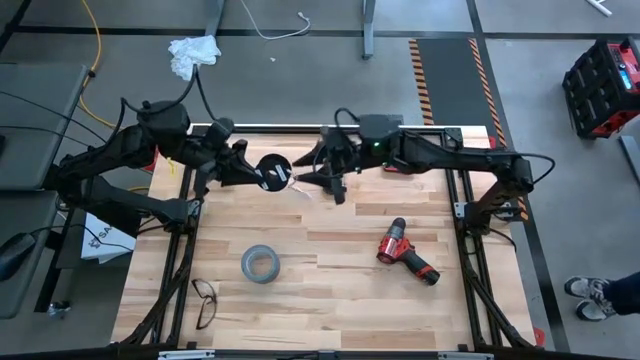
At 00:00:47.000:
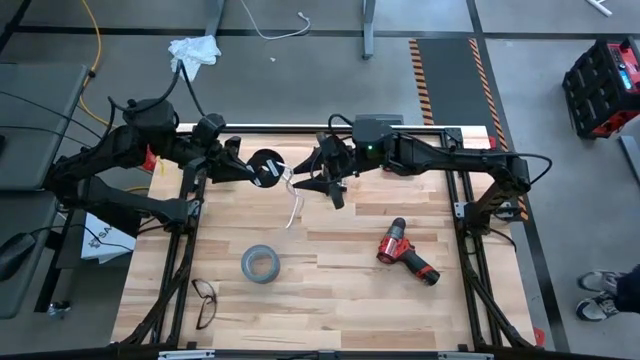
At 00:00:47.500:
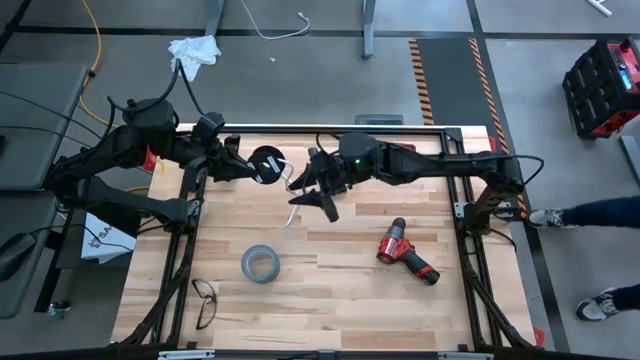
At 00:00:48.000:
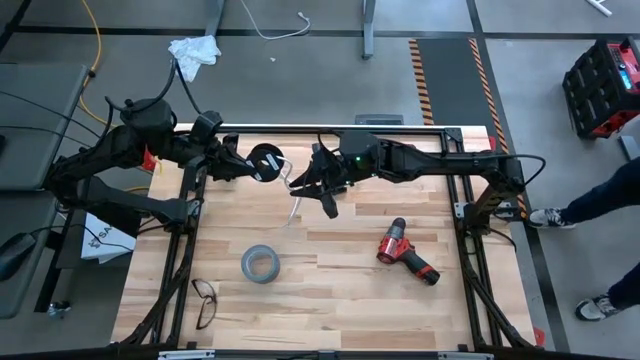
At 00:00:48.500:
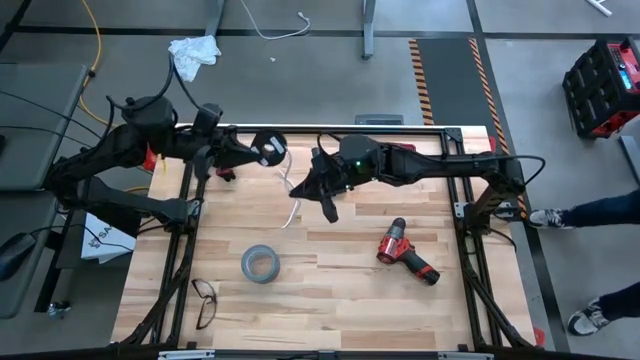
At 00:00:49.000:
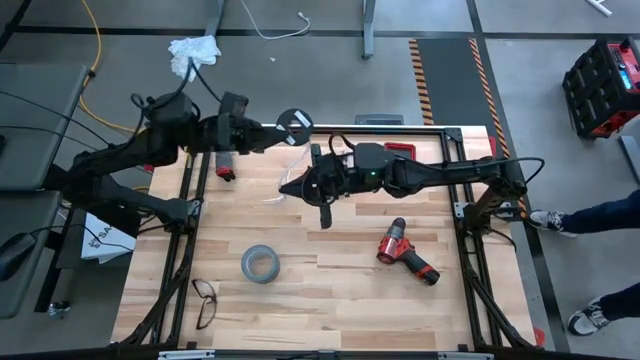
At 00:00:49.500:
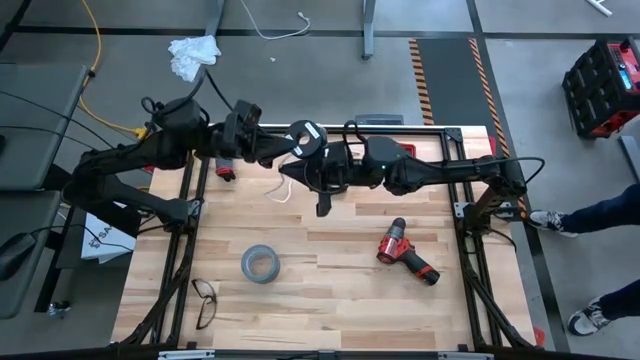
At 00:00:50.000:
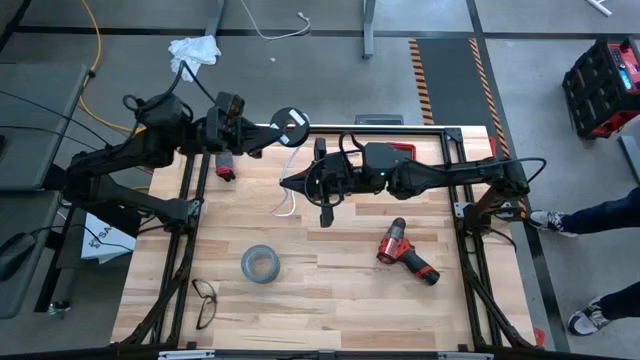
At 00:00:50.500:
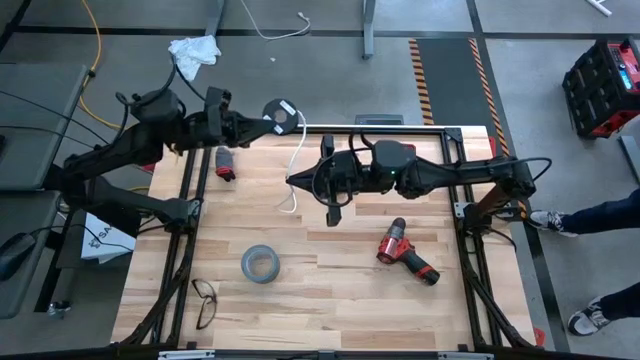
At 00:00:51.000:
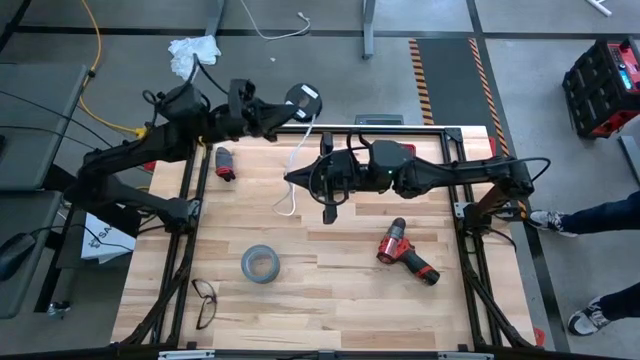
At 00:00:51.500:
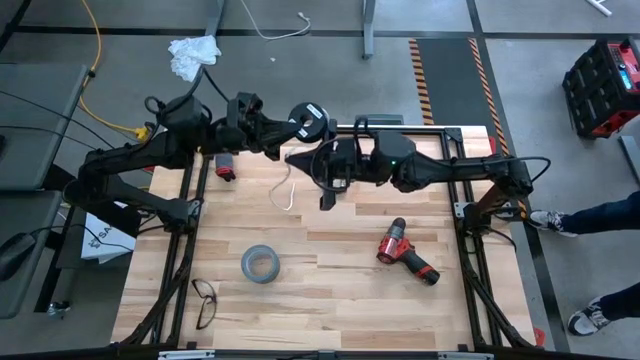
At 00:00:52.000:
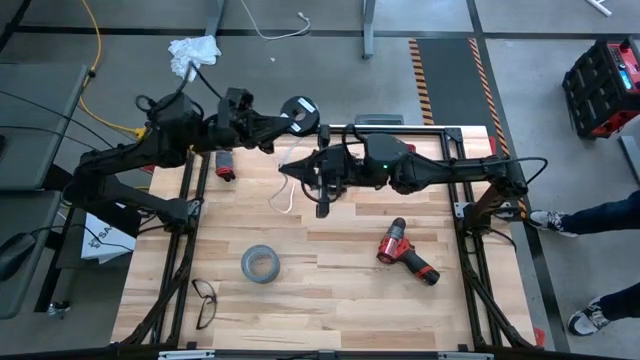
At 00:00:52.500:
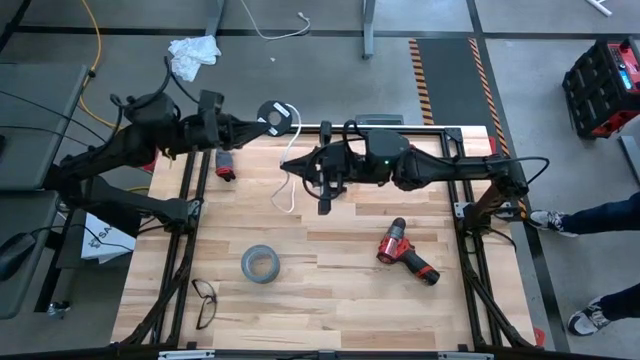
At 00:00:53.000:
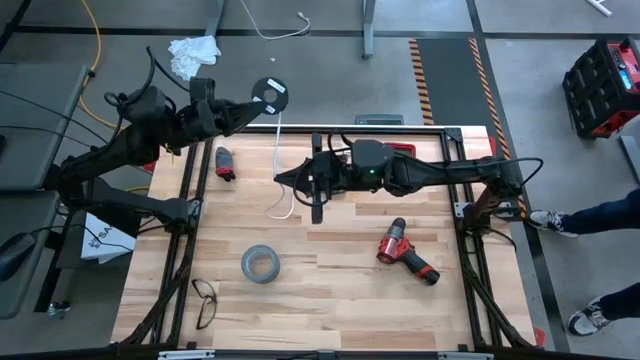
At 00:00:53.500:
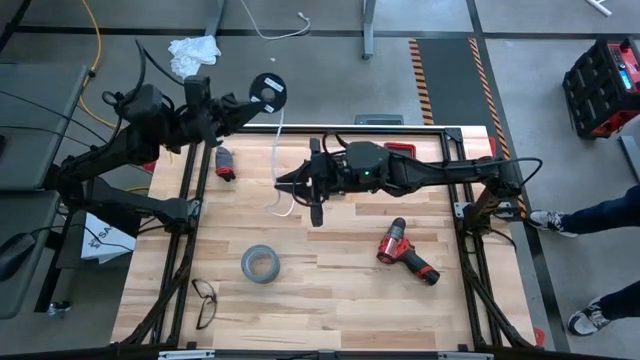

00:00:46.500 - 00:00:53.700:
Task: Coil cords
Coil the white wire

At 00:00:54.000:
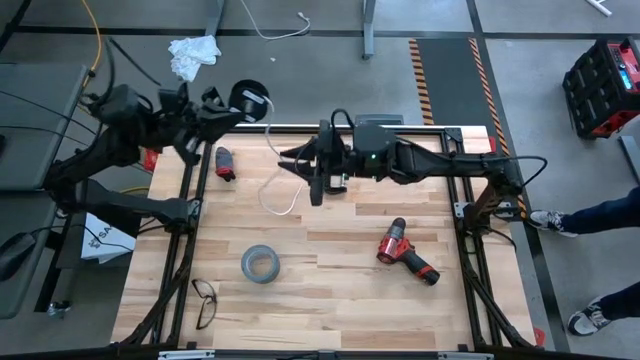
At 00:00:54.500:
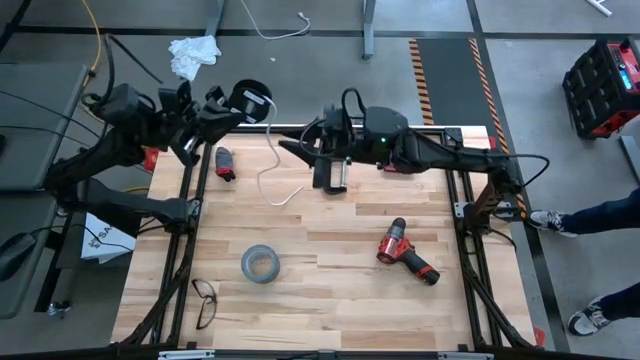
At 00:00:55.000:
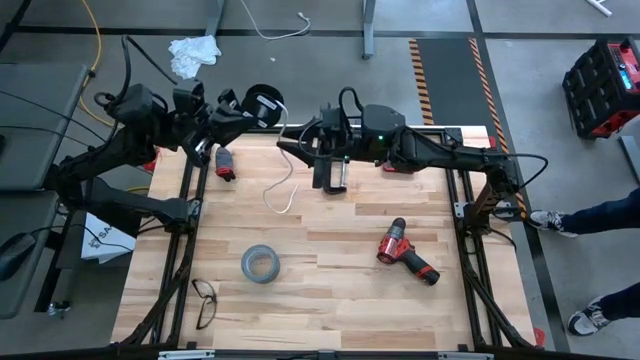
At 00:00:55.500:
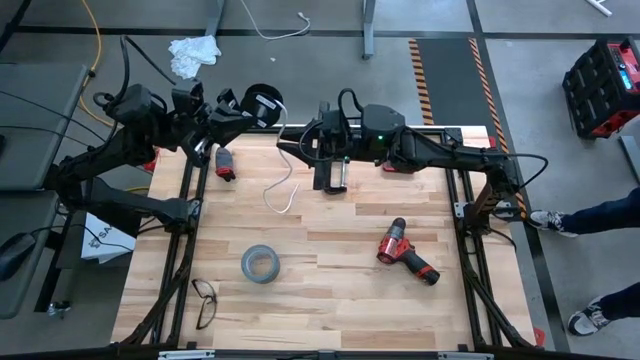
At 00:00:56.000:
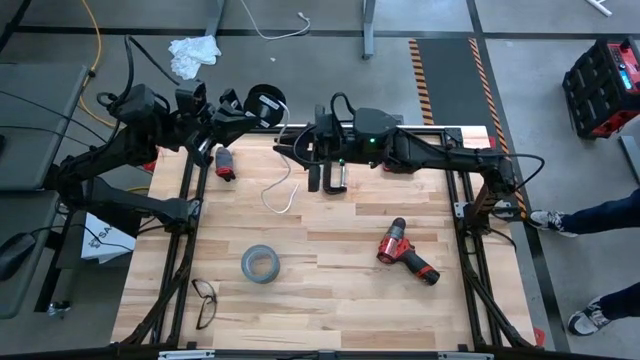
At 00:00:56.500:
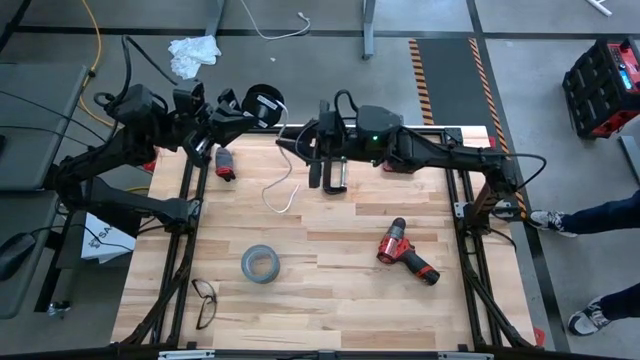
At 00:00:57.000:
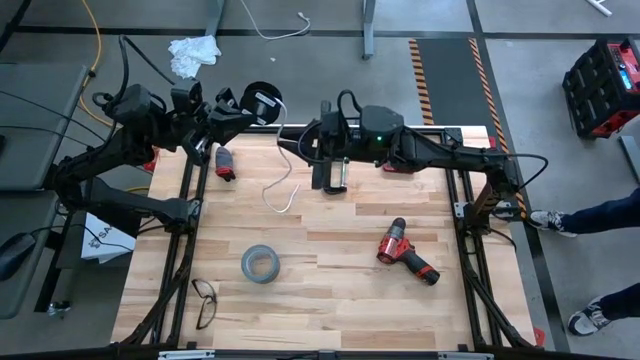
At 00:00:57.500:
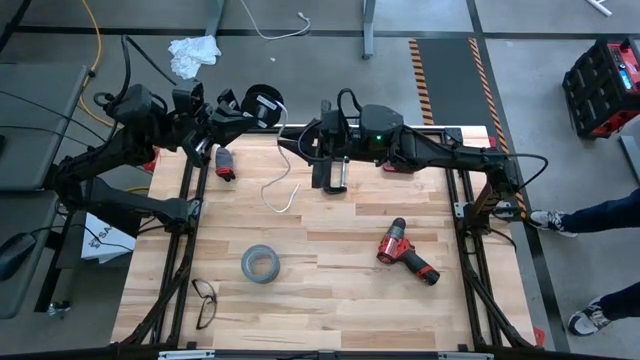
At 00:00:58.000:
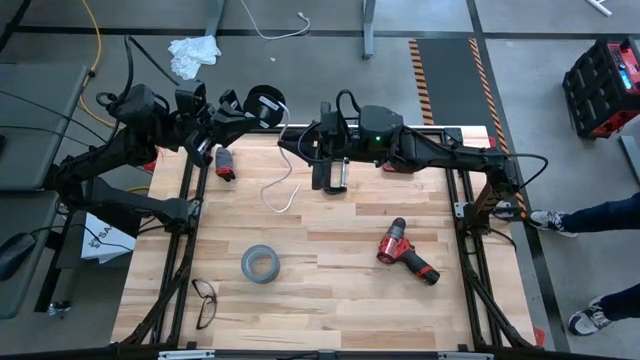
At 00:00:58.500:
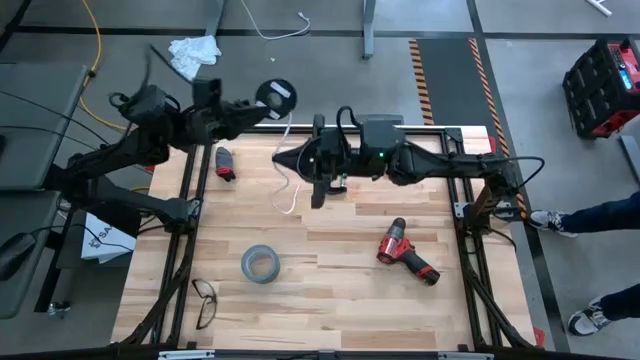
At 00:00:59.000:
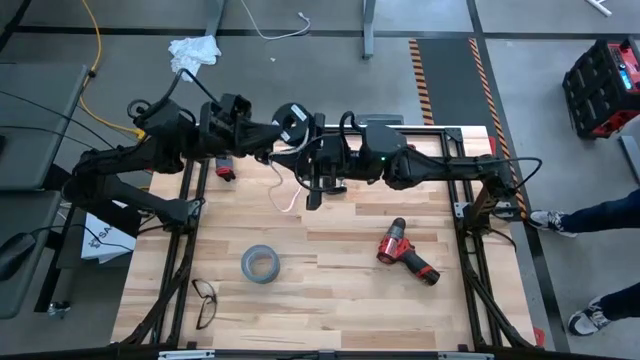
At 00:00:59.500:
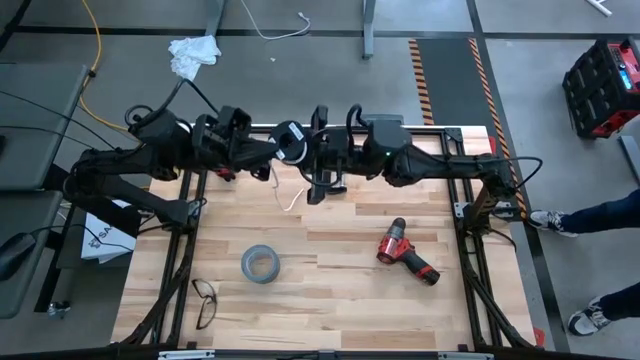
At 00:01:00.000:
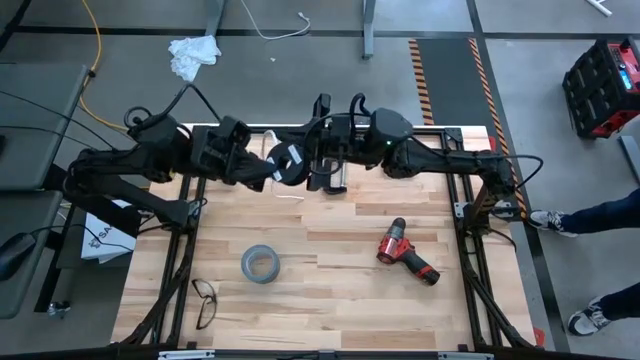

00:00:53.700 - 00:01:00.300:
Coil the white wire

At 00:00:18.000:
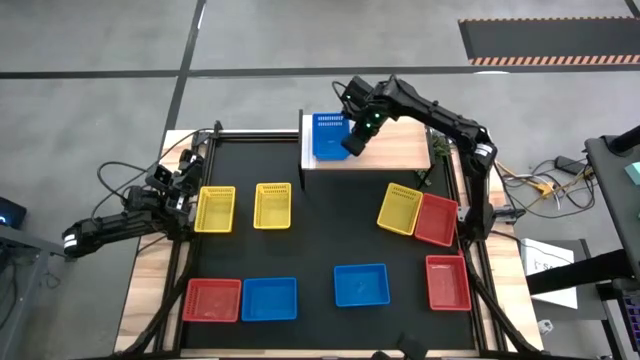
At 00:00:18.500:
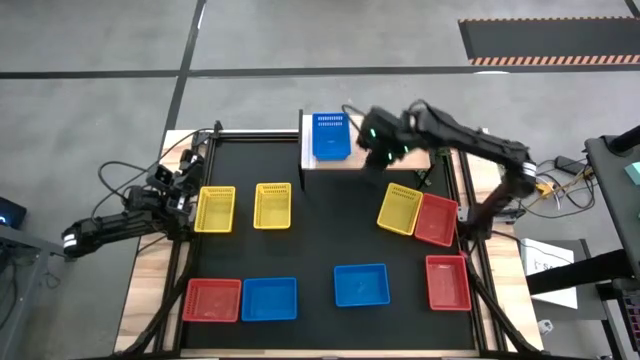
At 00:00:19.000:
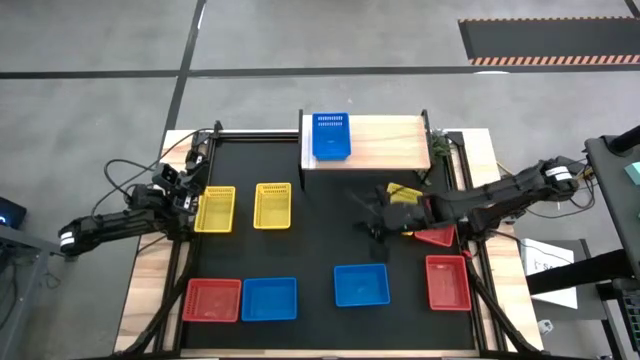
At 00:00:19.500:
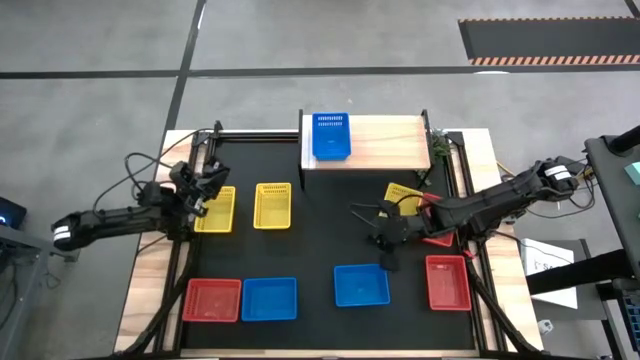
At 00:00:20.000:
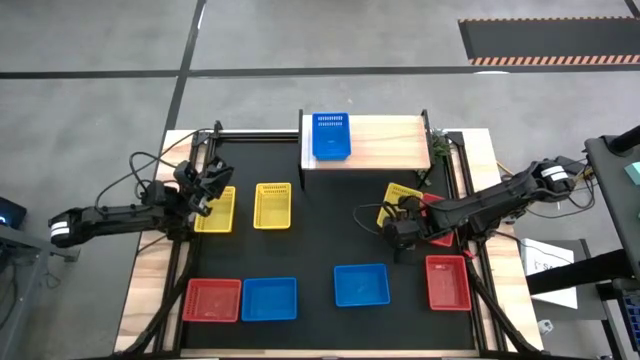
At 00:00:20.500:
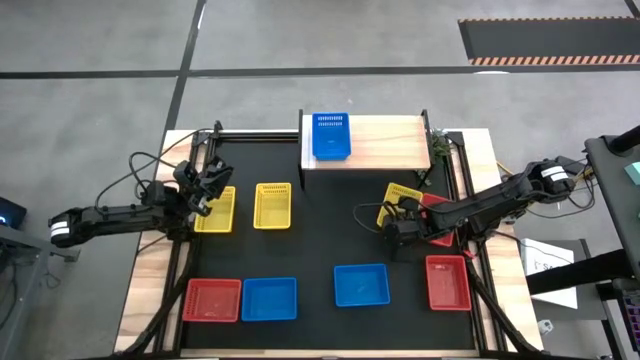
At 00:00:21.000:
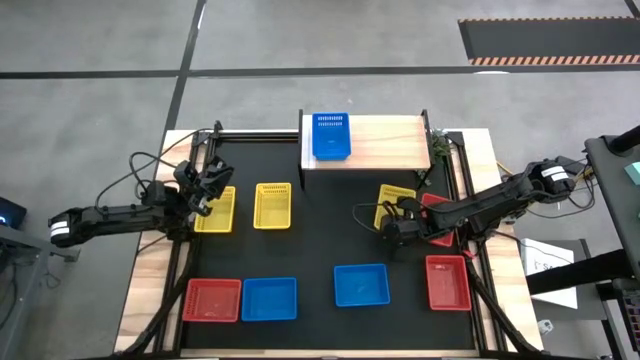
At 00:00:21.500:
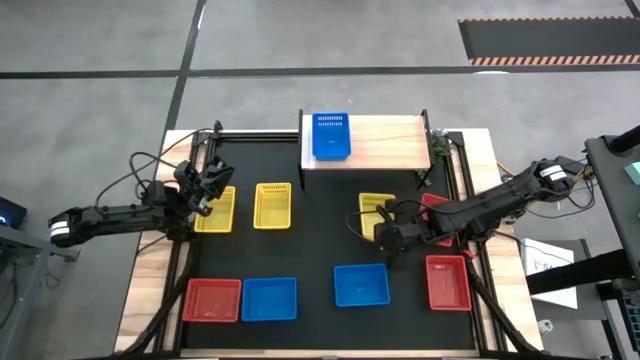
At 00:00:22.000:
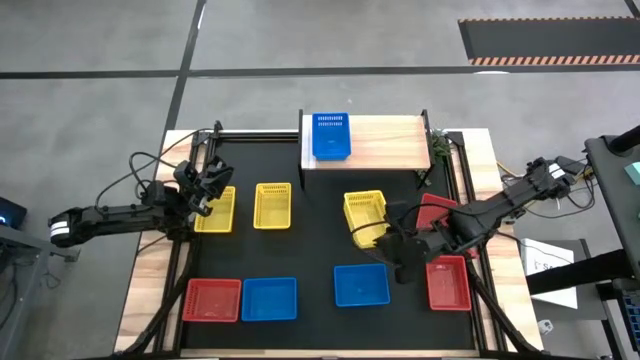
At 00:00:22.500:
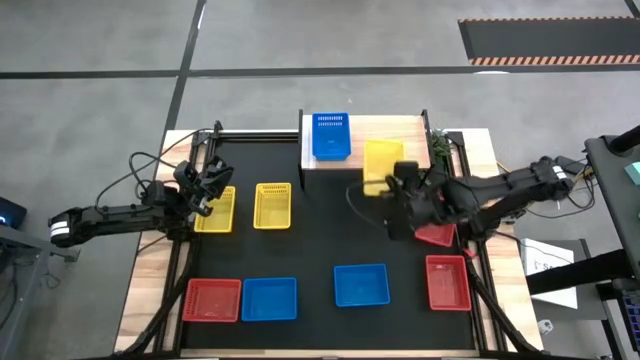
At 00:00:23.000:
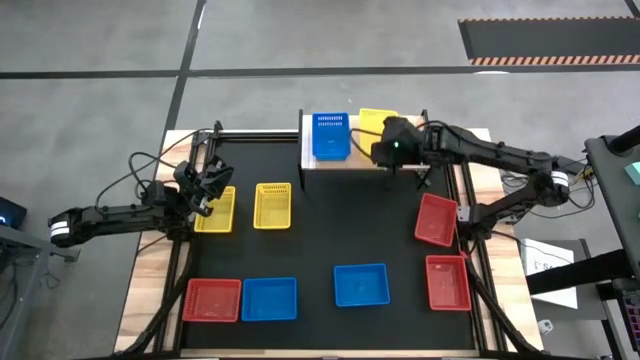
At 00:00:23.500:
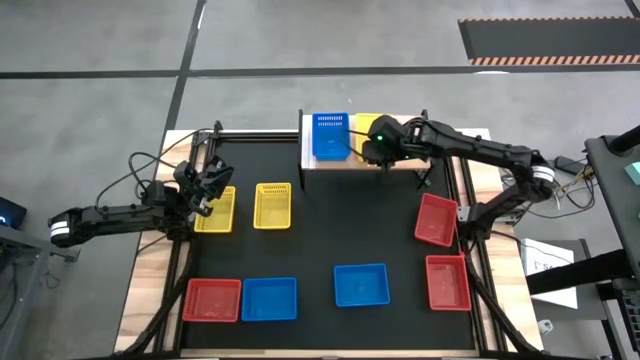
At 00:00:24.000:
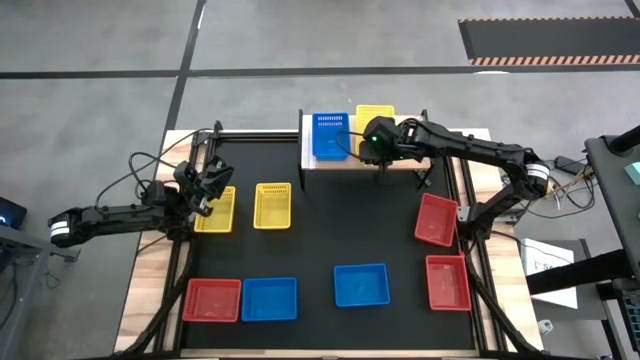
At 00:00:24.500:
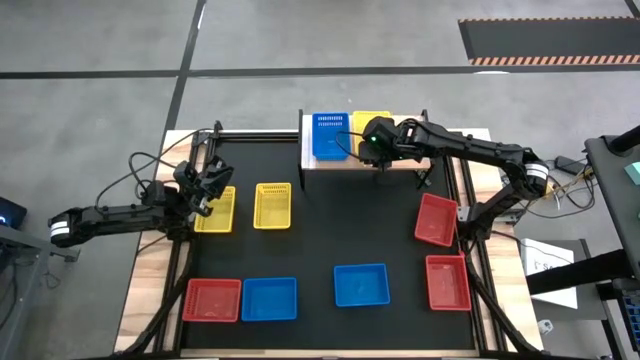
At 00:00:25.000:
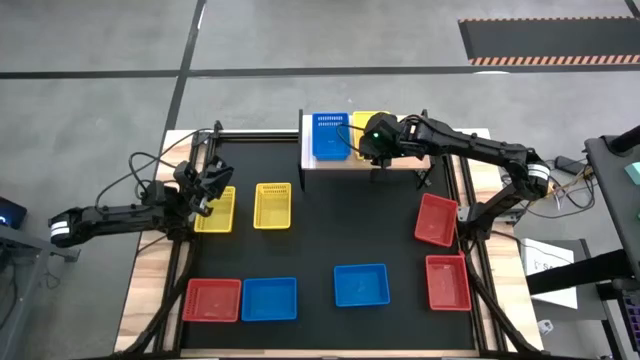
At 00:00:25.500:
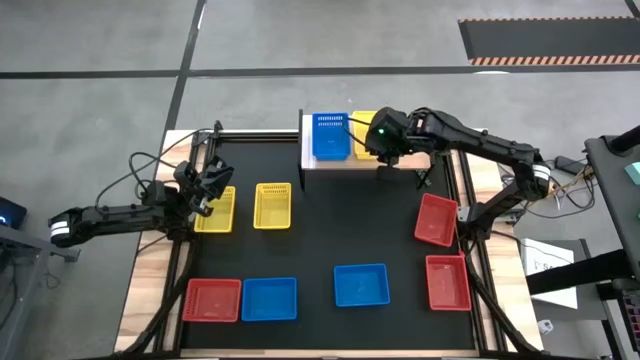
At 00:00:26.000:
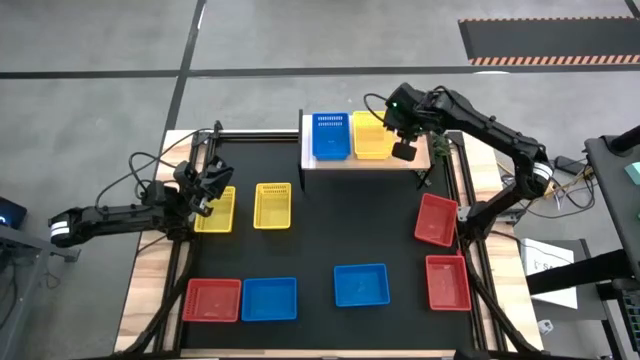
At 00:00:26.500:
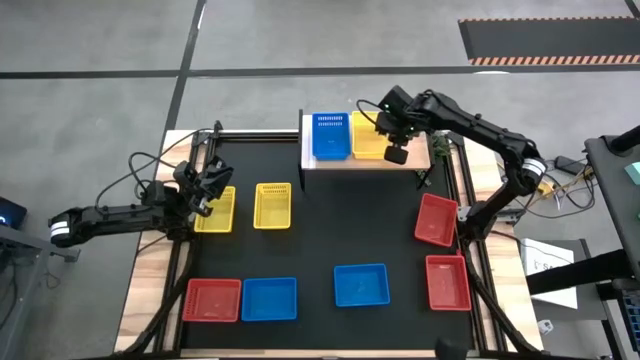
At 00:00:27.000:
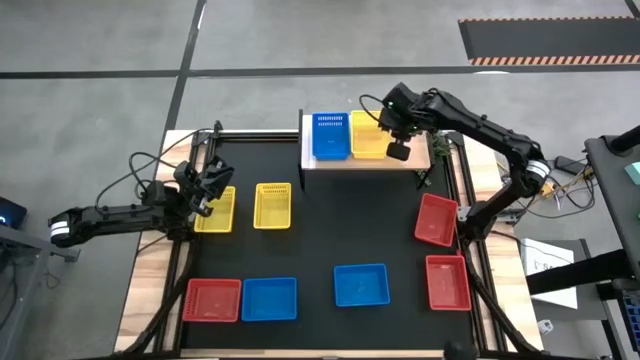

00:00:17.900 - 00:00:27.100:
Task: Stack baskets on shelf by color
Put the right yellow bin on the shelf
